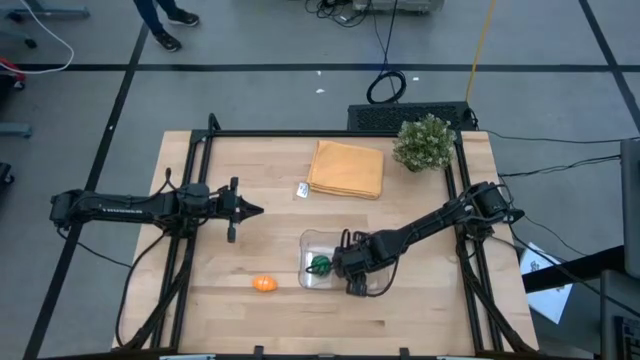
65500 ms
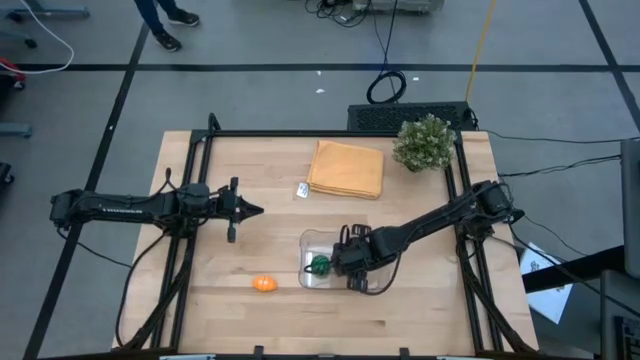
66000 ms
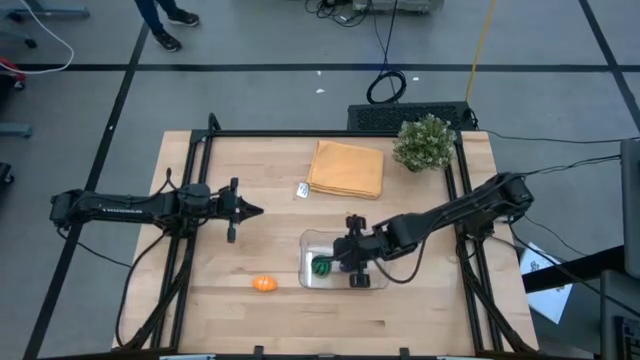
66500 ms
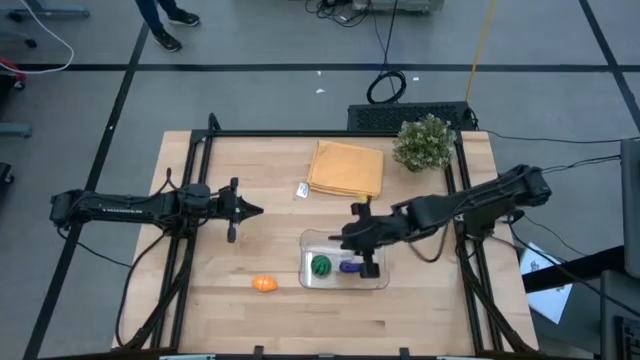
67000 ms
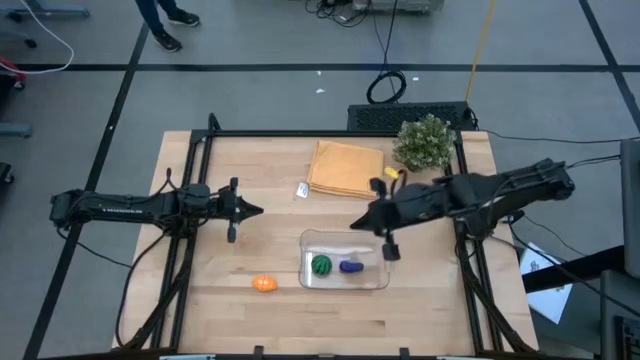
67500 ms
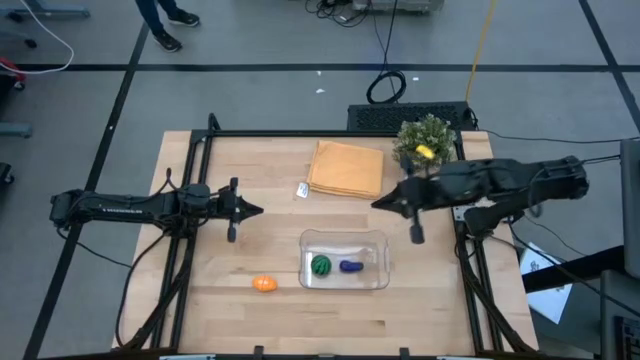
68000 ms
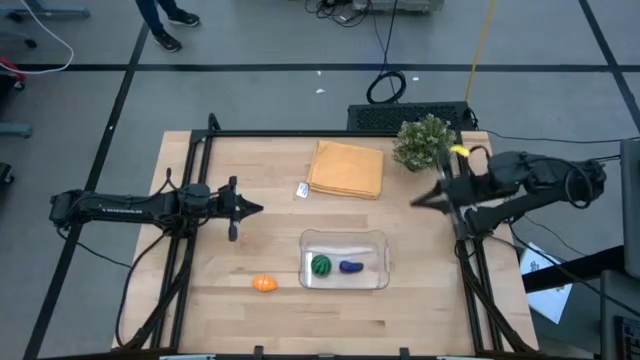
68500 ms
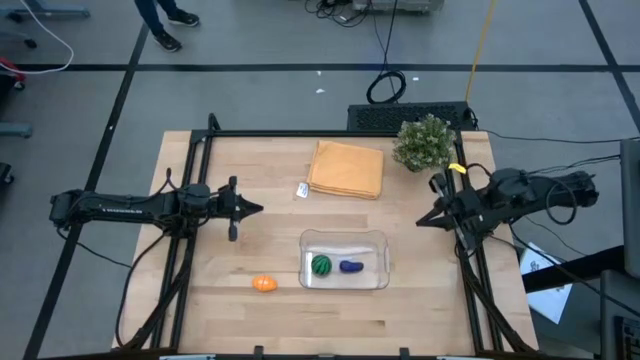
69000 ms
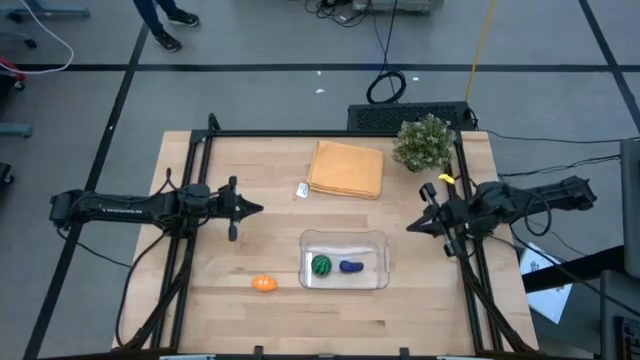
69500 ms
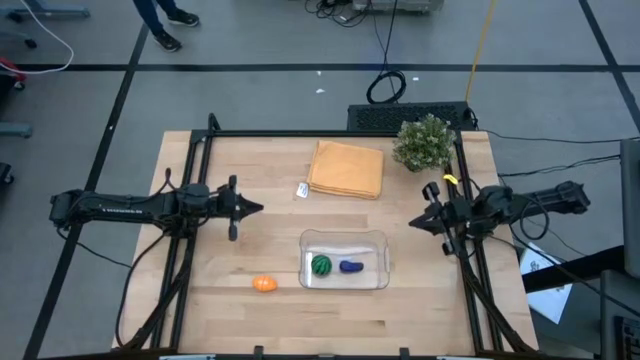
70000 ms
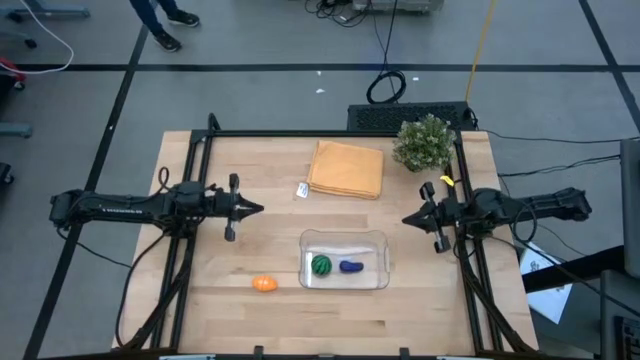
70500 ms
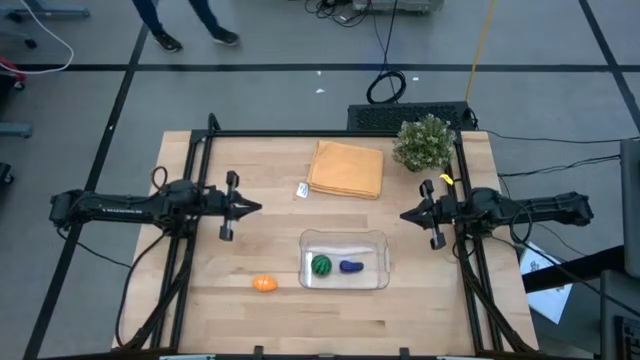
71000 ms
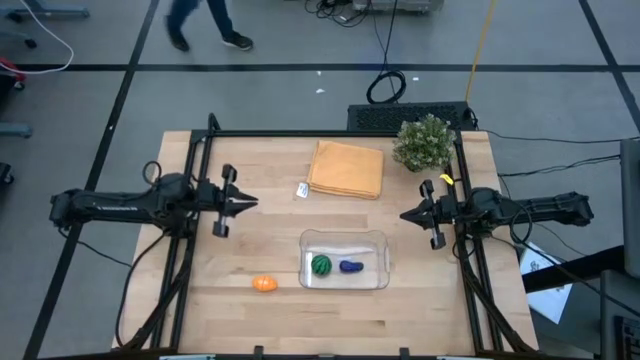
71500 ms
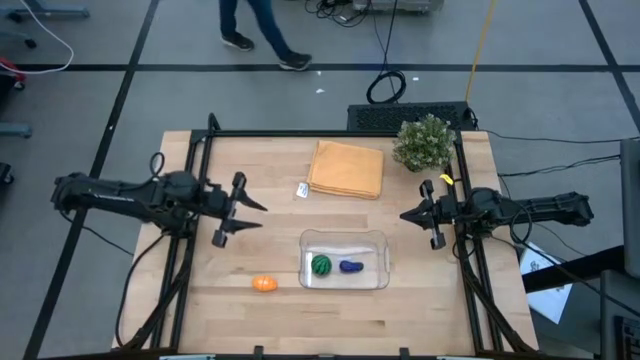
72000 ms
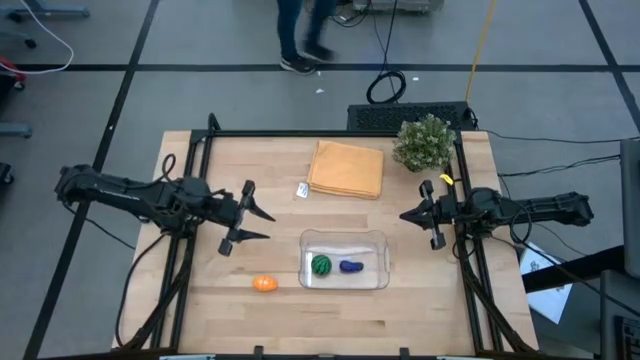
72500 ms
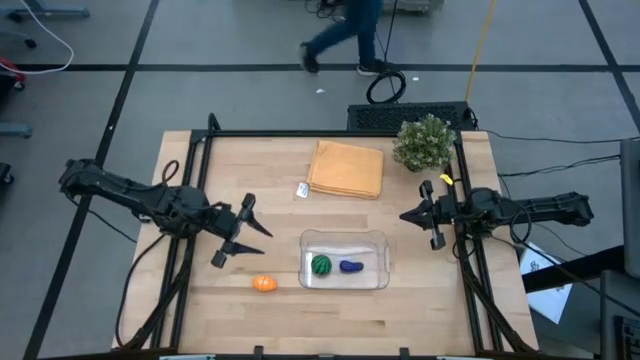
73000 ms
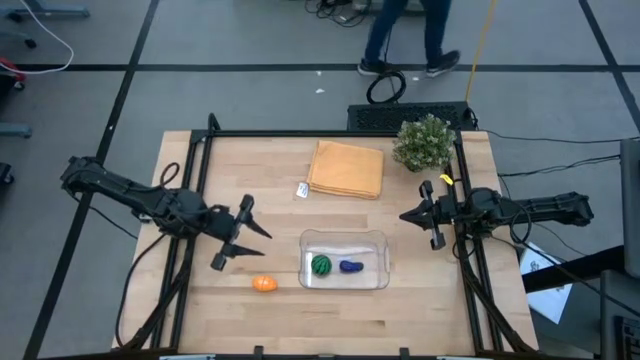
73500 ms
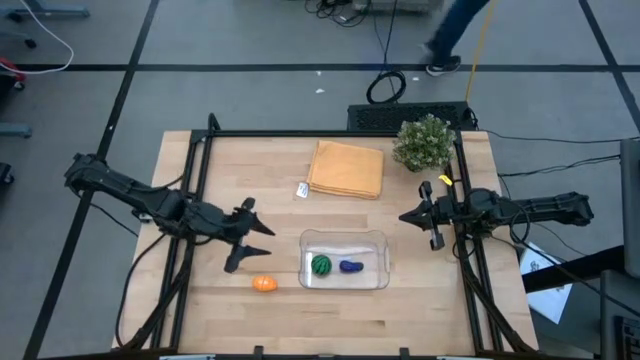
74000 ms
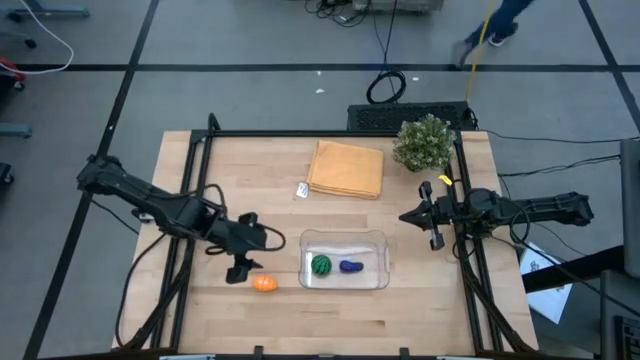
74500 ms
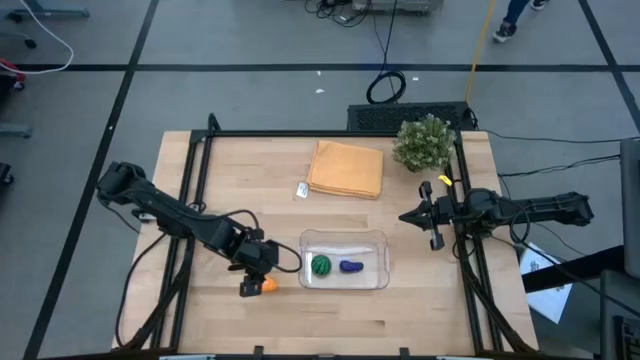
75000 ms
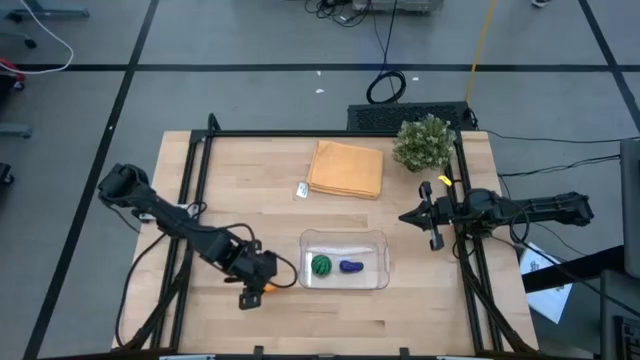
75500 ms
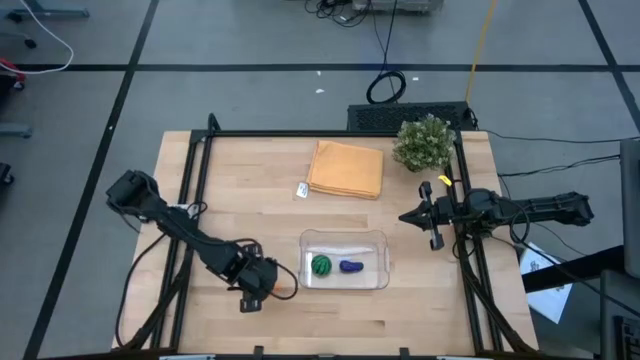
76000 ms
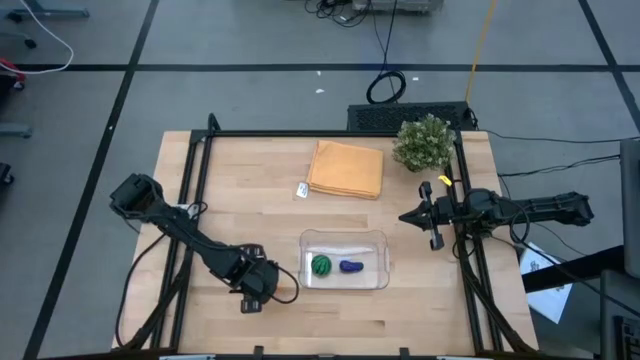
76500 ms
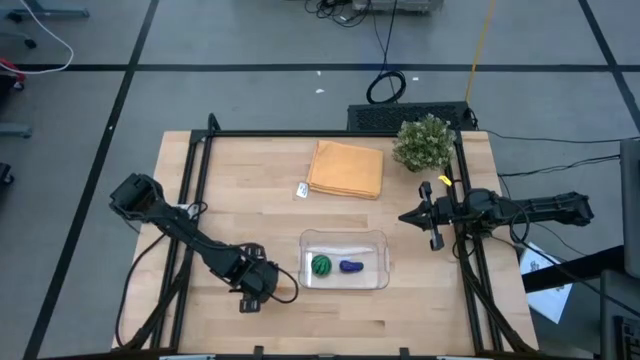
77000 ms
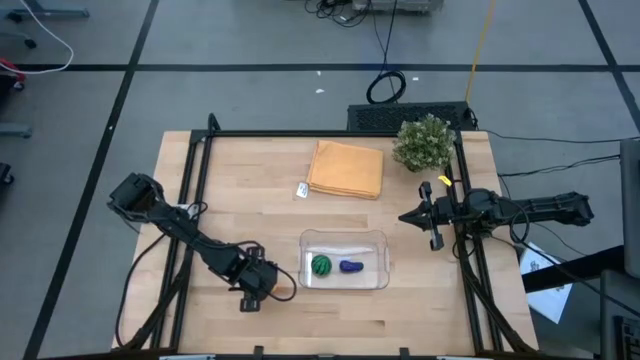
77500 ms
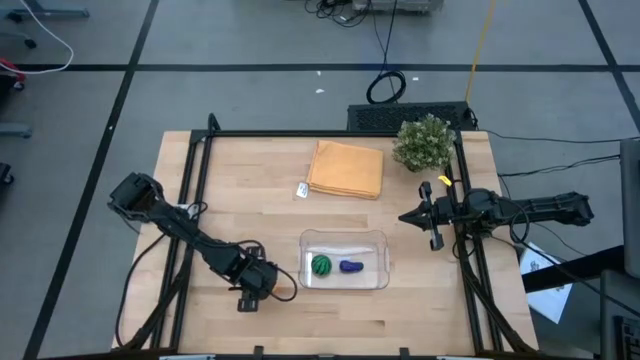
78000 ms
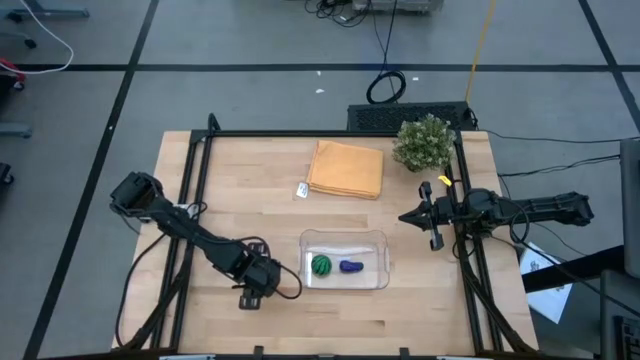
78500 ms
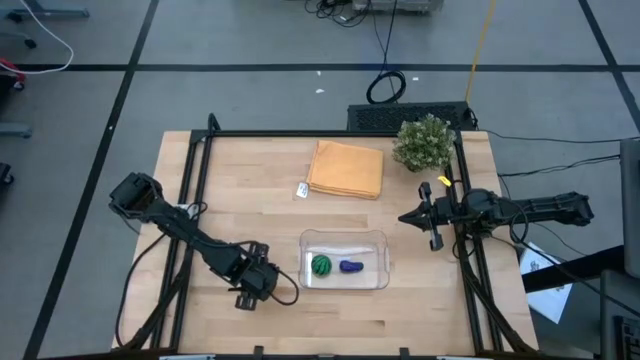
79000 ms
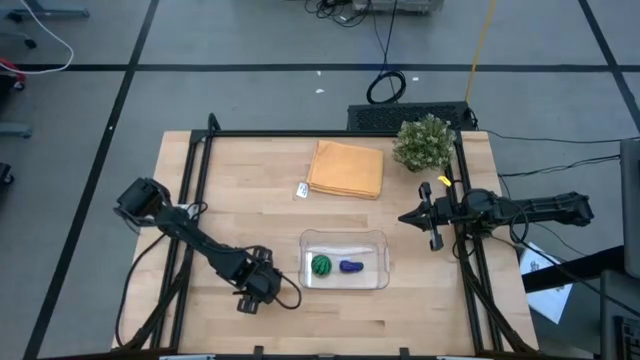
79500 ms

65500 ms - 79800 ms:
Task: Pick and placing Produce into tupperware
Put the croissant into the transparent bin

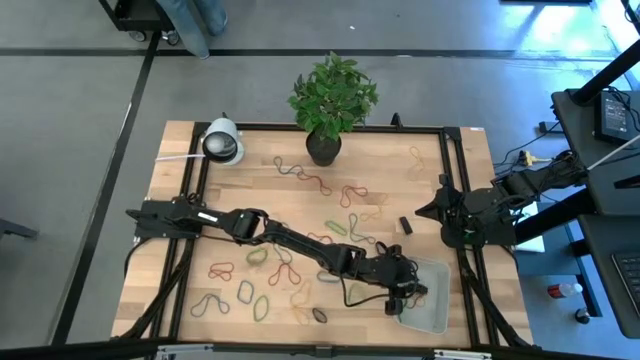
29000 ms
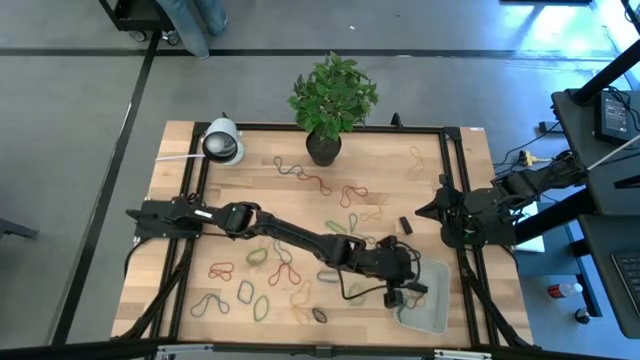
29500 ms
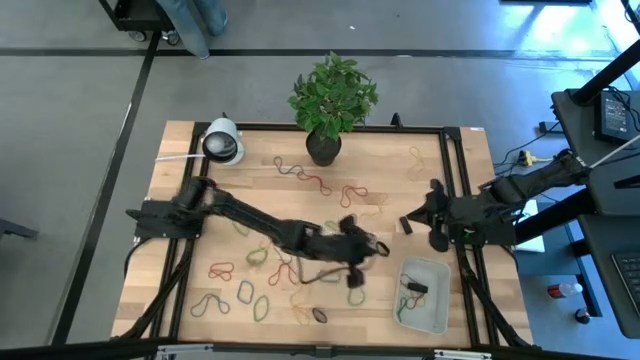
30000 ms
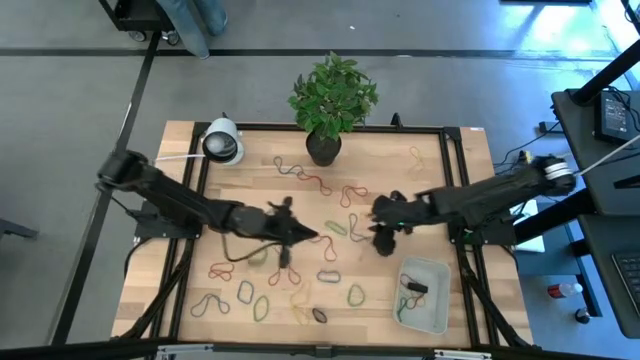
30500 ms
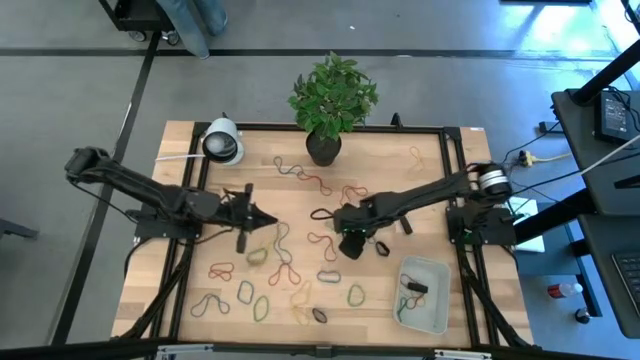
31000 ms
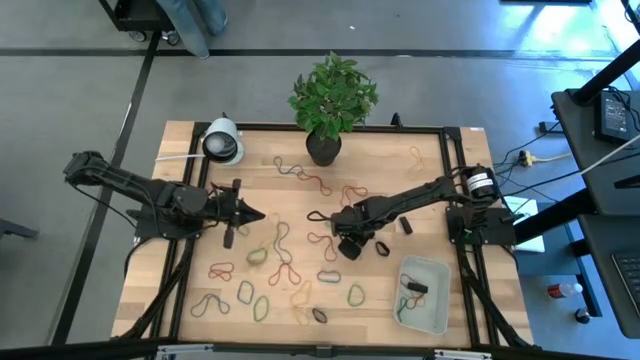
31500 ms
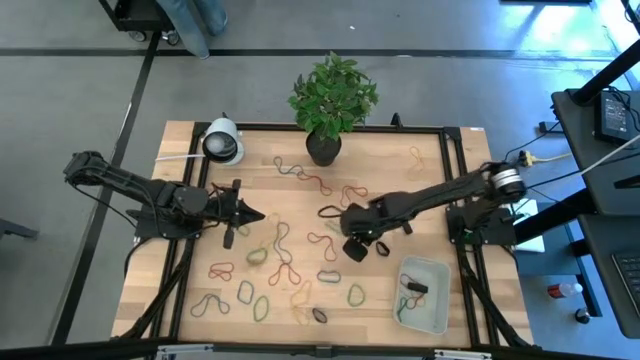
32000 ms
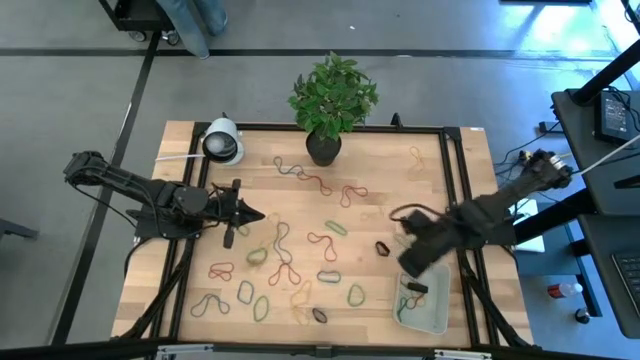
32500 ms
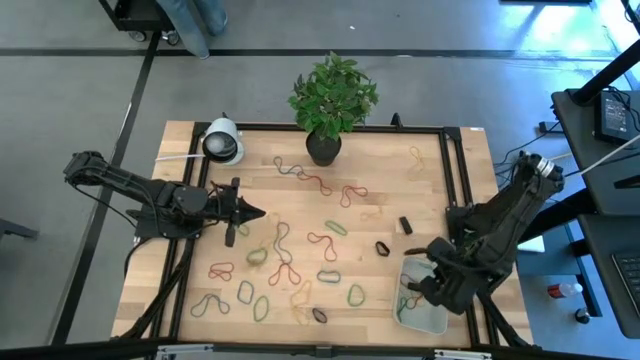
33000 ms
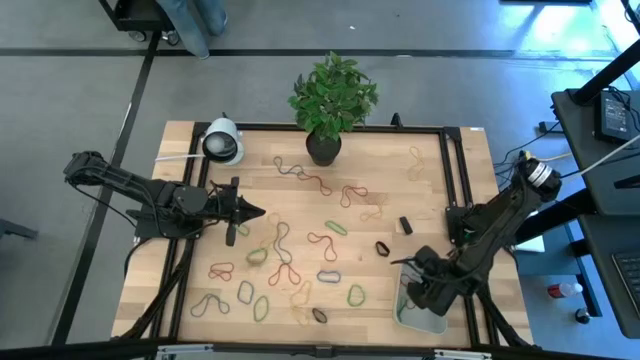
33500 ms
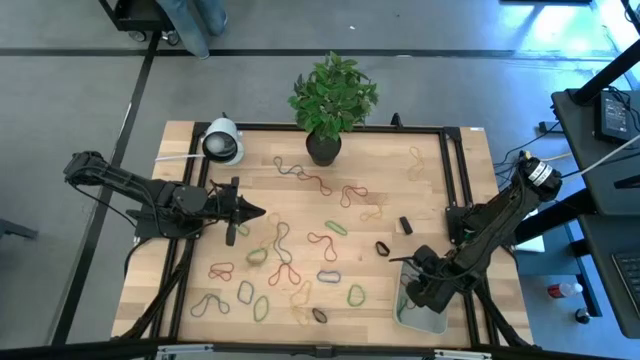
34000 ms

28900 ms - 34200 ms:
Task: Pick and place rubber bands into bin
Put the blue rubber band into the gray bin
